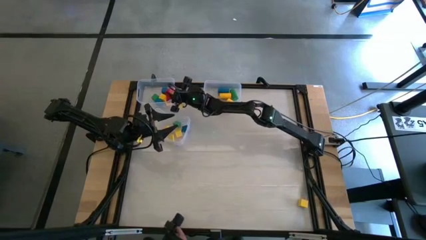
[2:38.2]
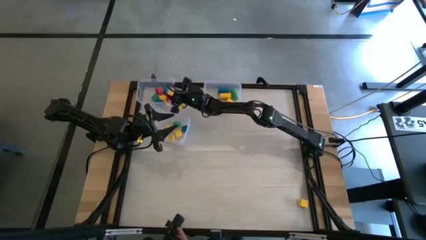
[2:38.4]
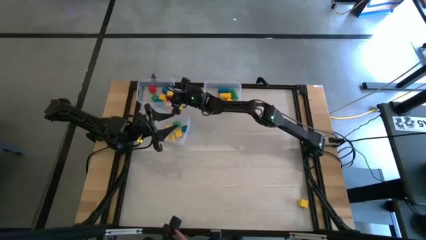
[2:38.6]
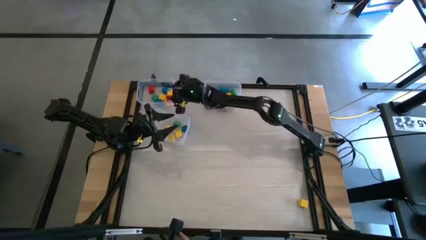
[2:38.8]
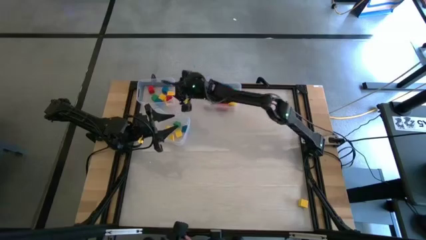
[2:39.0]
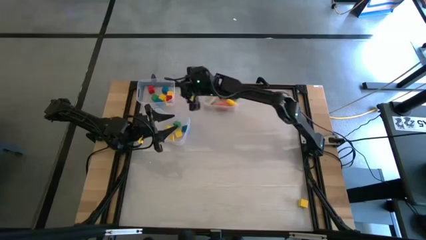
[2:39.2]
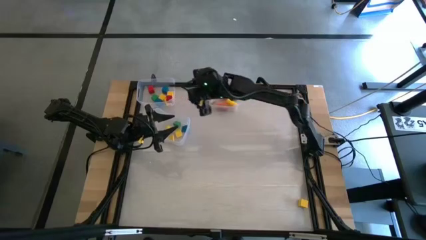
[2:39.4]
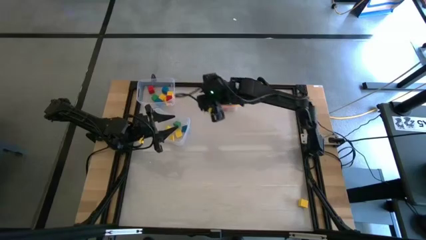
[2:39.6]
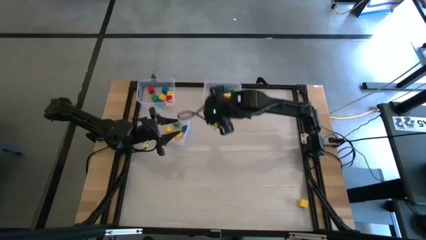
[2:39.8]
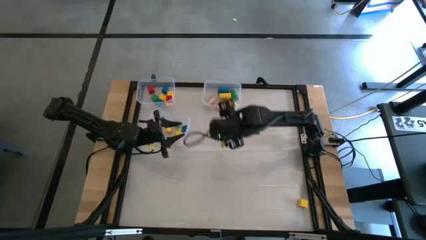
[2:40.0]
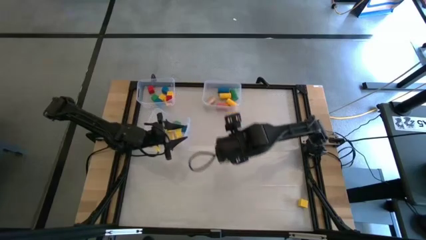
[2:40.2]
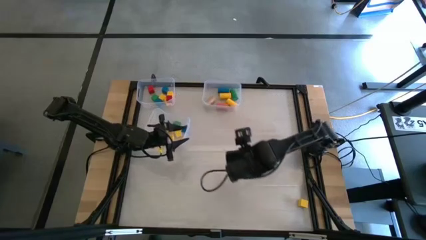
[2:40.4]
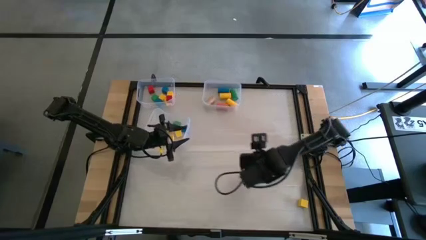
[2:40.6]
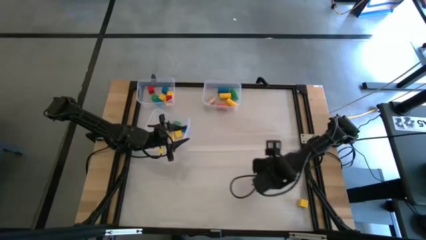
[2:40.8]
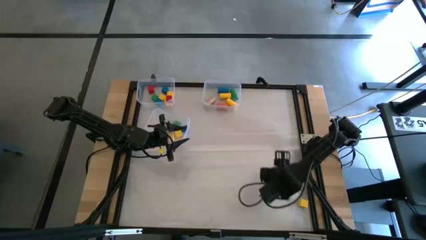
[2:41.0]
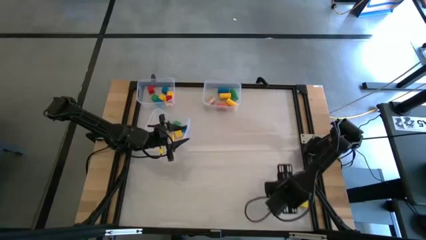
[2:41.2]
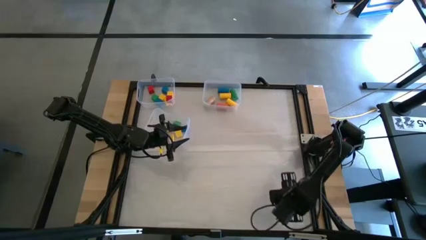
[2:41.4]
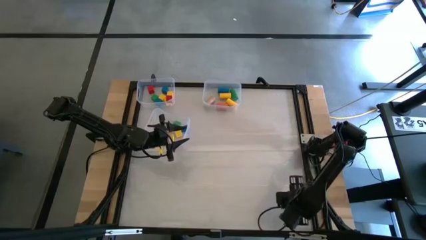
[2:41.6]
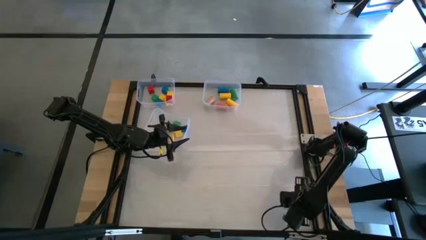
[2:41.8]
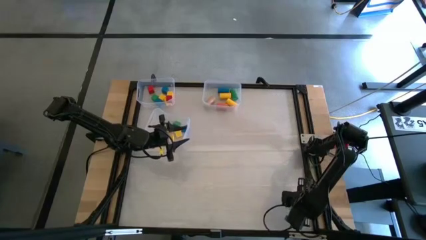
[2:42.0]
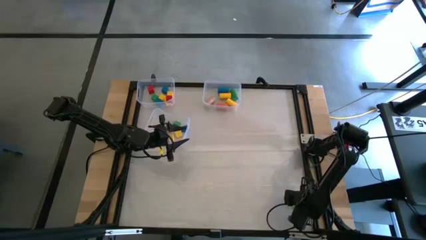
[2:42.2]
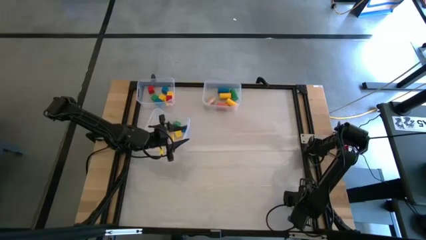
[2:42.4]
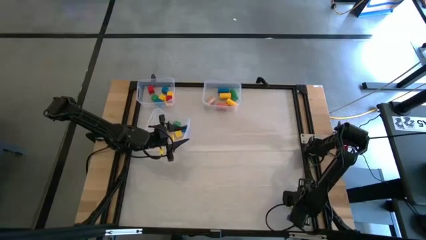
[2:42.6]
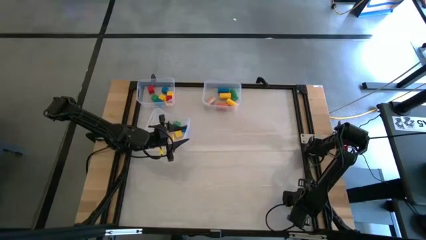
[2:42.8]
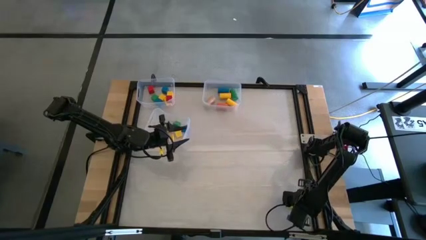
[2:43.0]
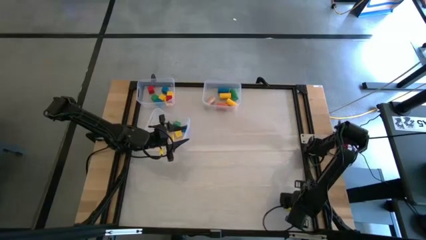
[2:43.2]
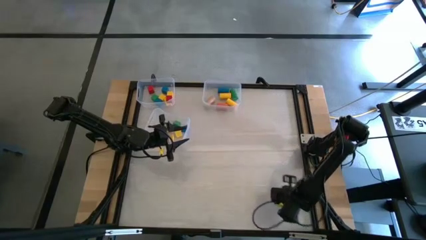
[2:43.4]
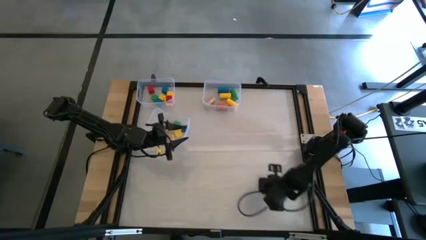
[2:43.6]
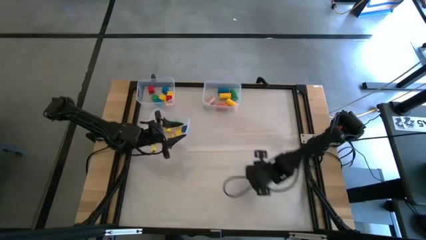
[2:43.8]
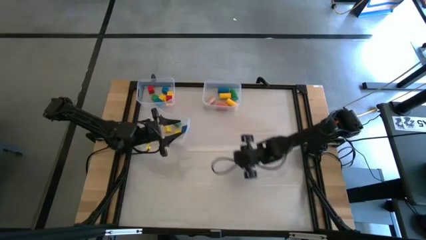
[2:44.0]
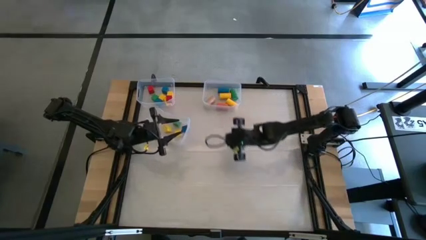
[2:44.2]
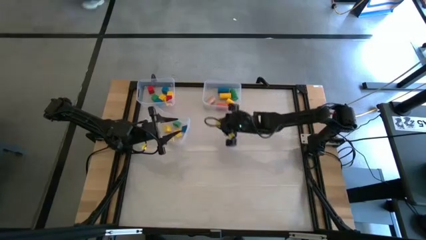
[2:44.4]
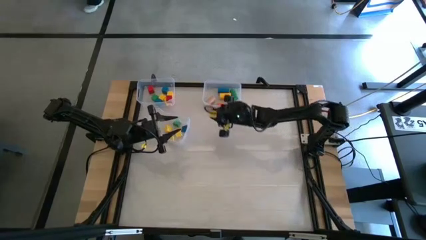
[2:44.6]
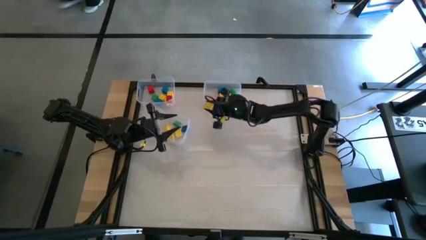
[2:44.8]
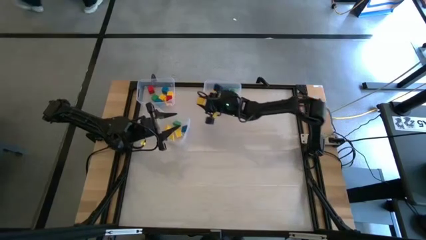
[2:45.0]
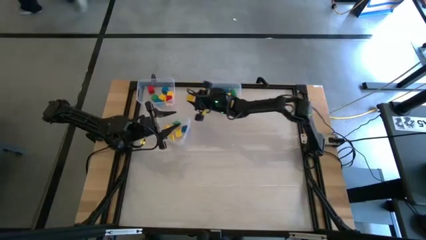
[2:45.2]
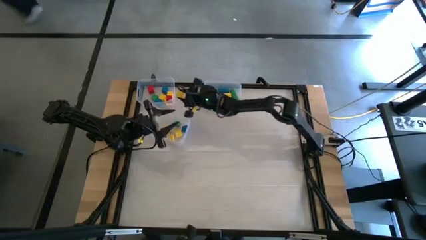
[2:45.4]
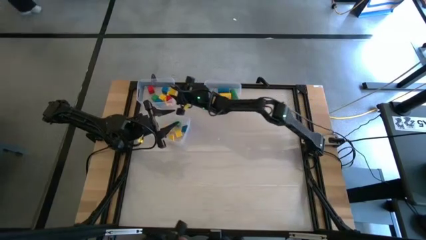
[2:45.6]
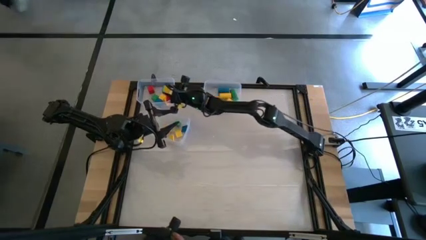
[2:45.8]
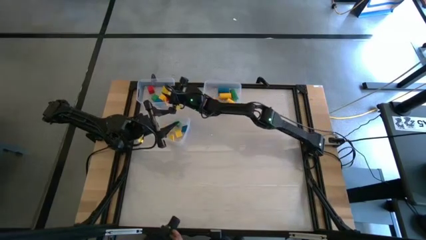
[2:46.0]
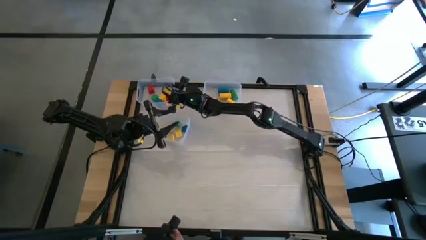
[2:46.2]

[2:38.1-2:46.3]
Task: Sort blocks by size
Put the yellow square game block into the top left transparent bin

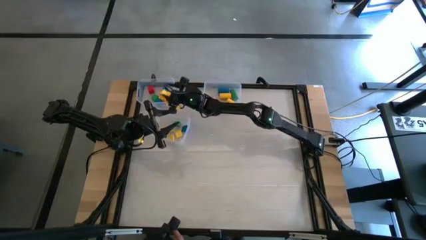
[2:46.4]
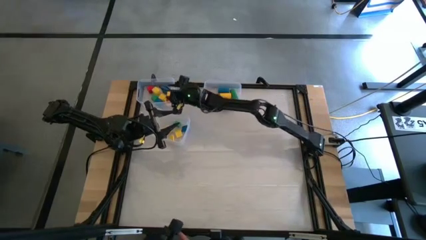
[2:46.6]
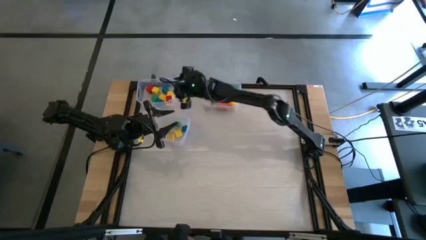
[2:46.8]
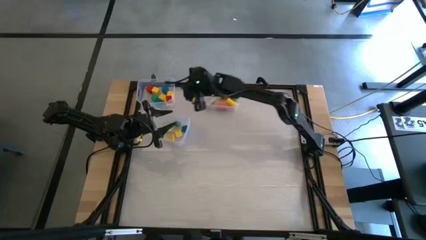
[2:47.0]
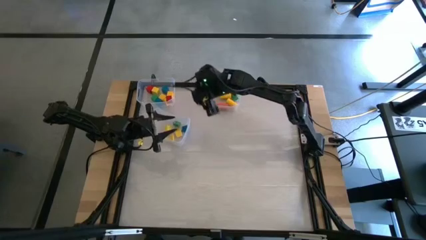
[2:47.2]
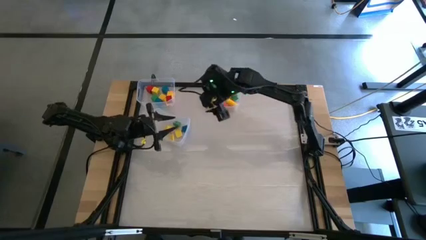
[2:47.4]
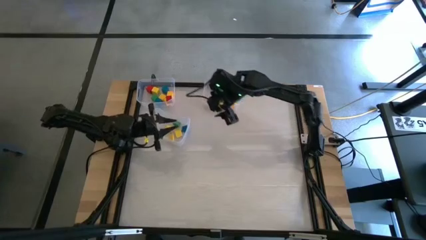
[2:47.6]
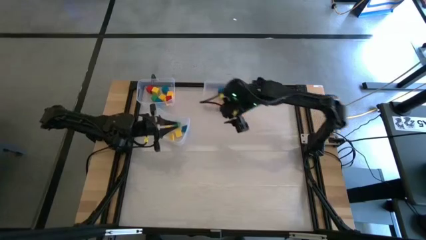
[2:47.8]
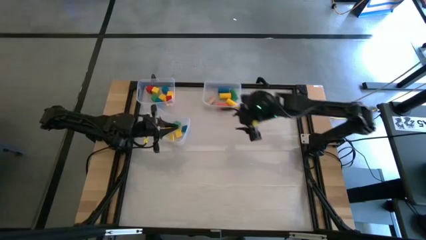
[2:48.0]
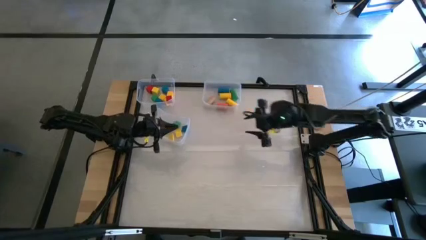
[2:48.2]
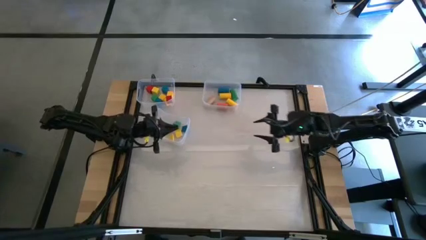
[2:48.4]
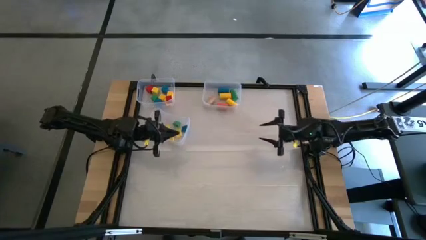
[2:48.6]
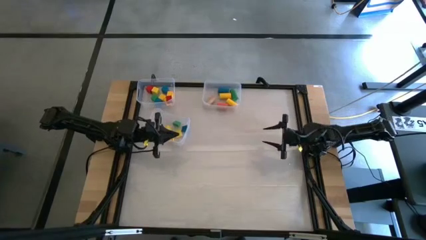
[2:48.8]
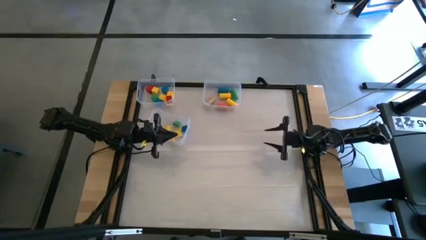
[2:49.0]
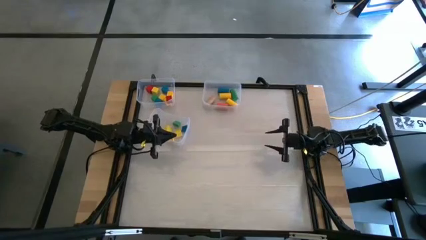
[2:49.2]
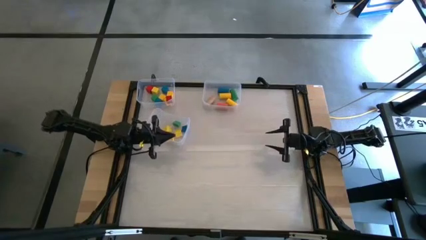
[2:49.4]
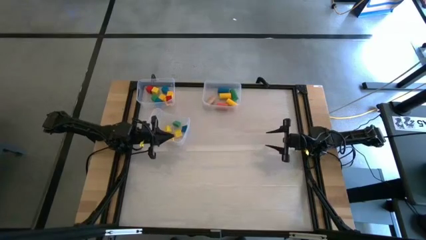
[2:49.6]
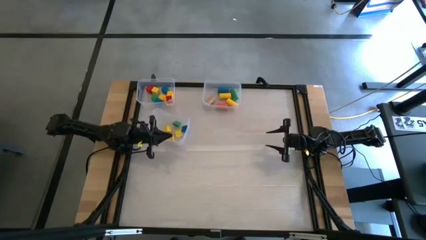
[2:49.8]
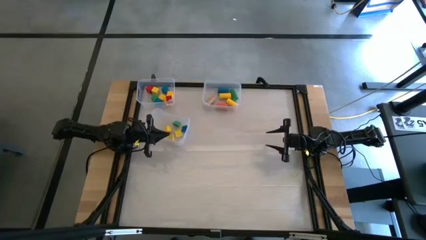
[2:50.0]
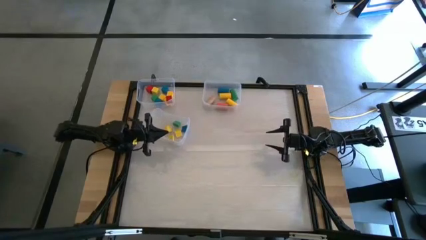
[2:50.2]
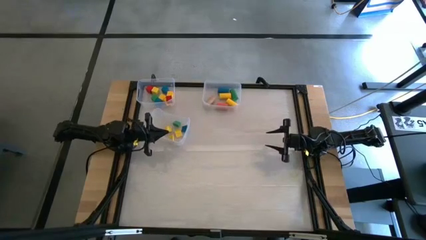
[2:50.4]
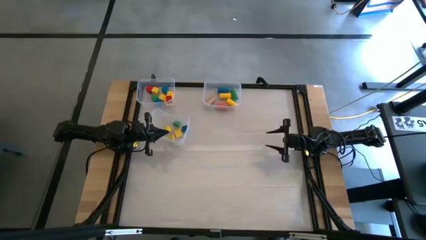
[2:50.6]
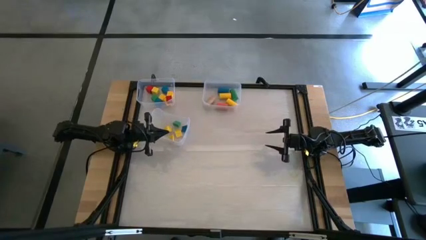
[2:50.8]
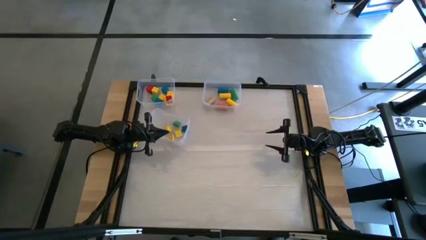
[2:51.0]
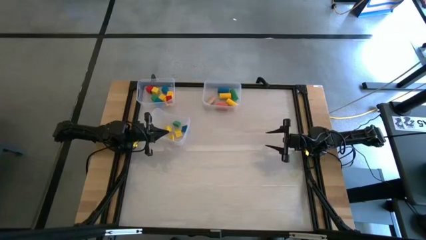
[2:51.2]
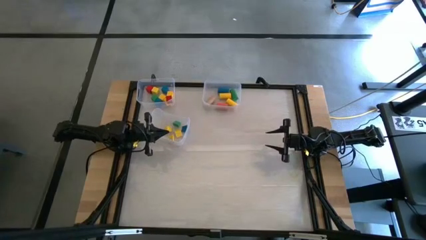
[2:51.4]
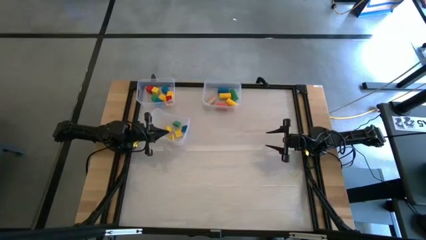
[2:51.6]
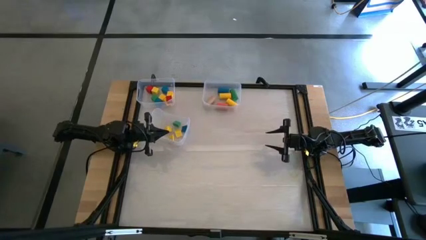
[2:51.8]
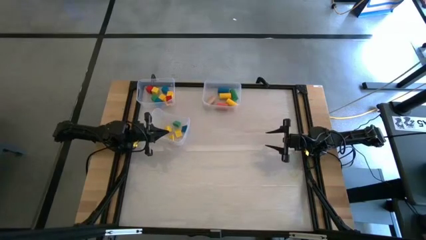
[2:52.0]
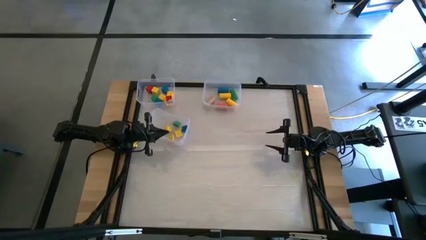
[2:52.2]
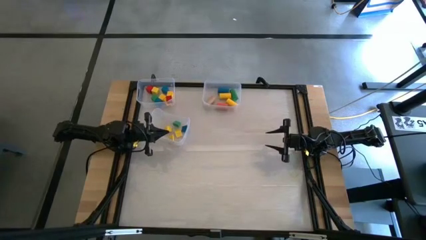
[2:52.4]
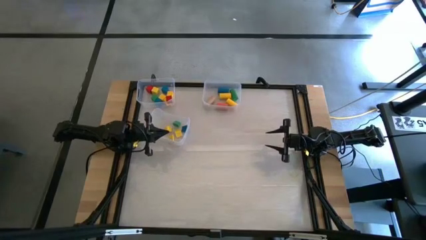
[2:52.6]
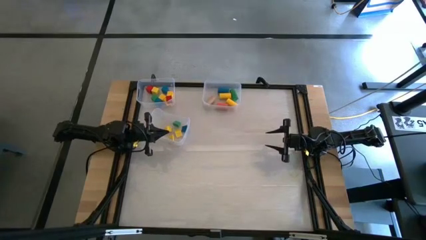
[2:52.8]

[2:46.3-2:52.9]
Return to Home Position
